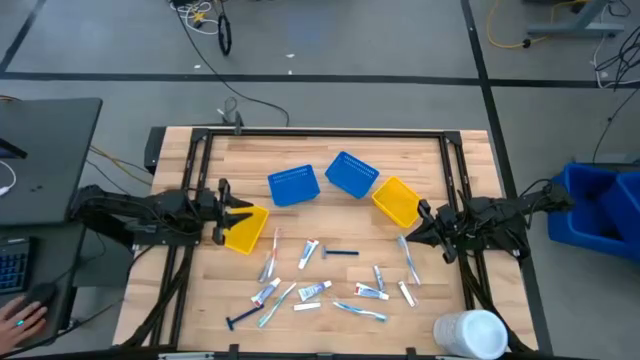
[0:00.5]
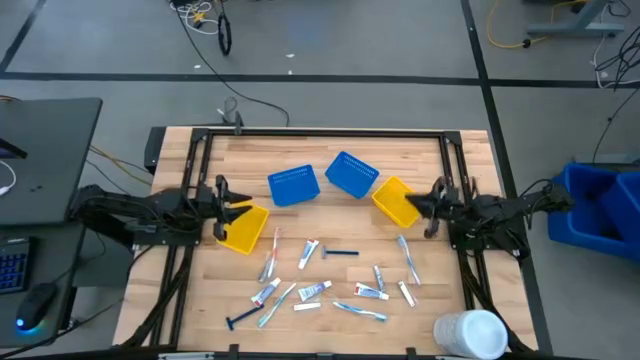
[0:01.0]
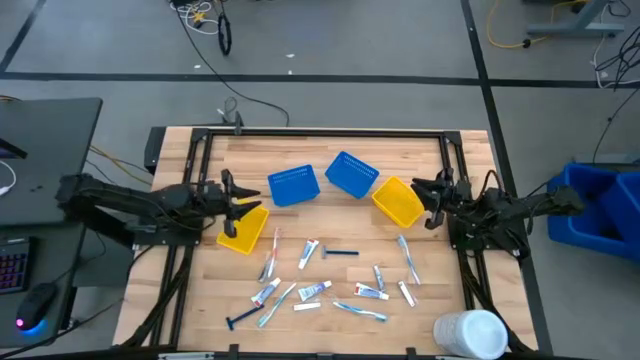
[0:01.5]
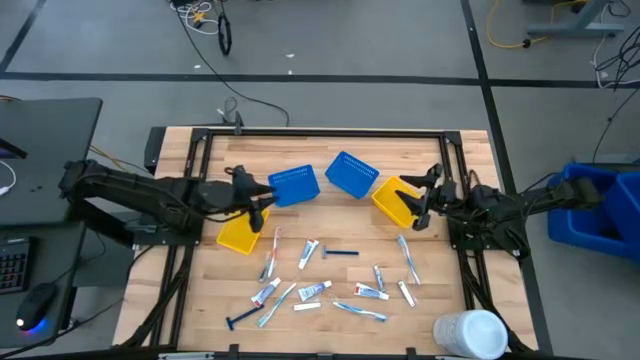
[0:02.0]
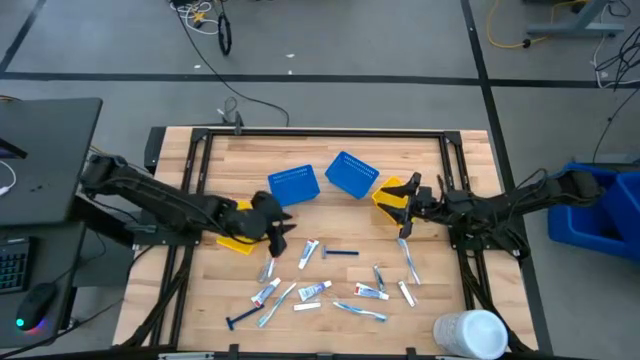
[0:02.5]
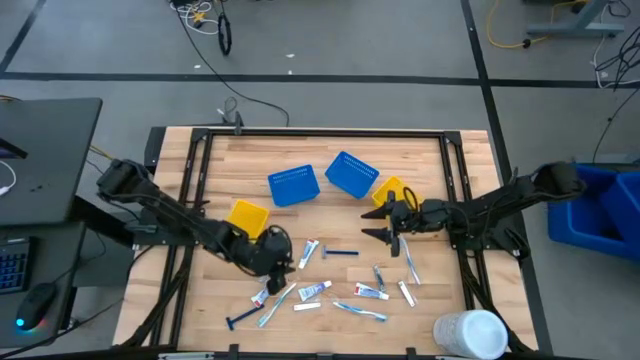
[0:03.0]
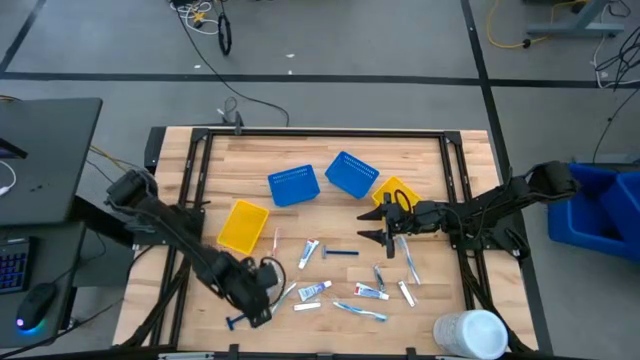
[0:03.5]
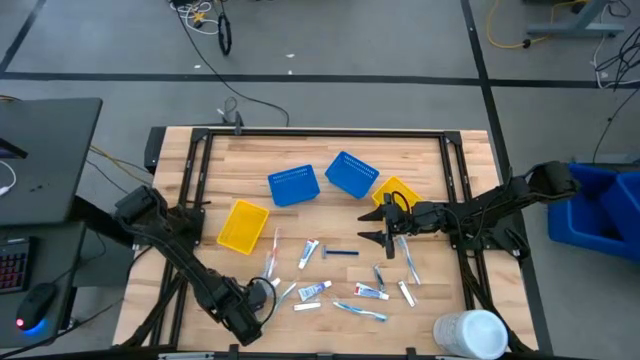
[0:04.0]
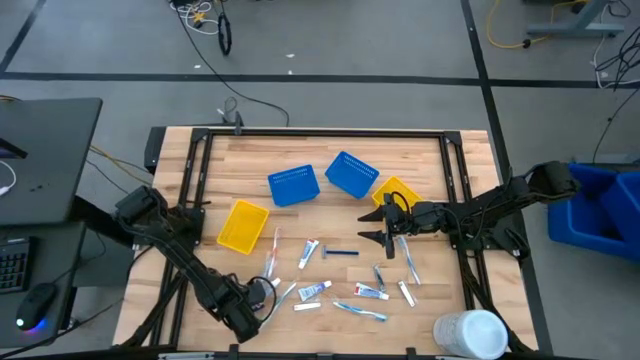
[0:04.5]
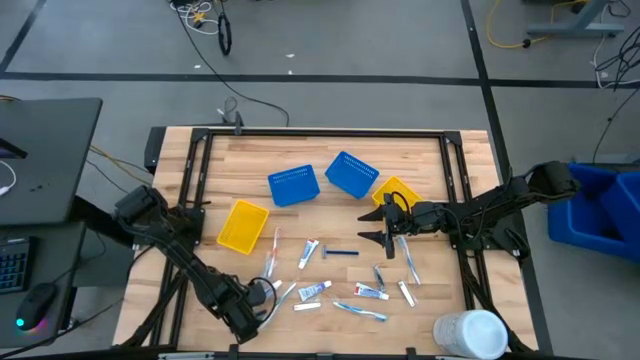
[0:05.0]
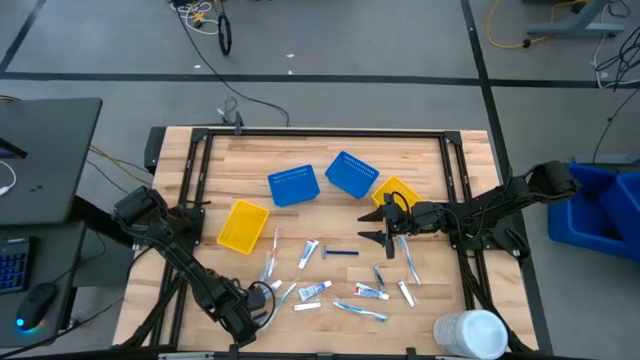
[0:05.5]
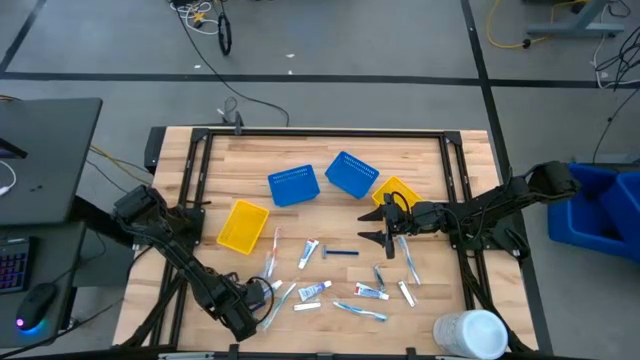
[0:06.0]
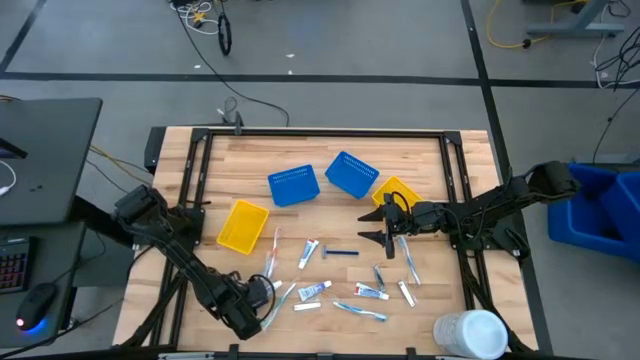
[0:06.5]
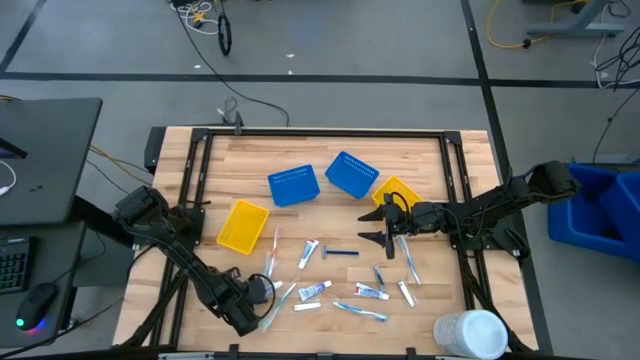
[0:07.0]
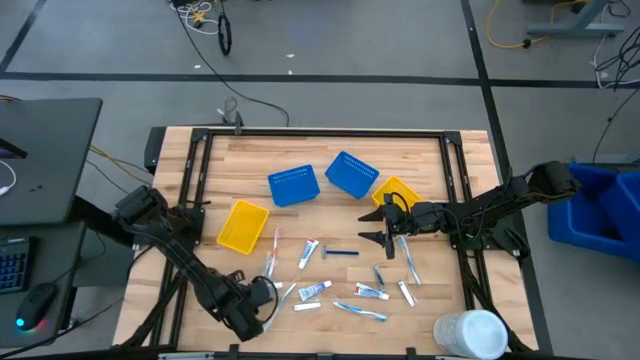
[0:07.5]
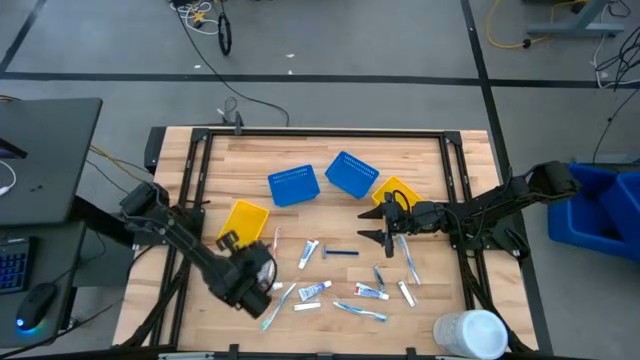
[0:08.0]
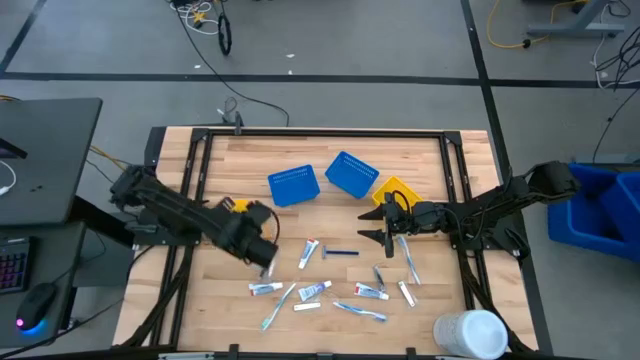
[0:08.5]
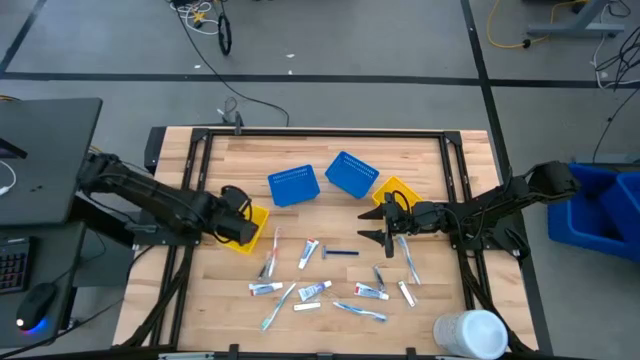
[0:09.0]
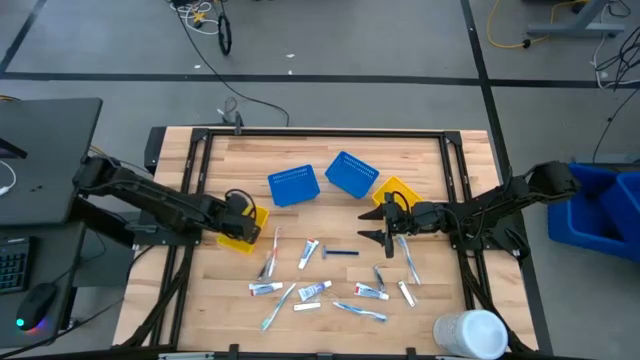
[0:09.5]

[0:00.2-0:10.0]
Task: Pick & Place Travel size toiletries
Put the blue razor into the left yellow bin

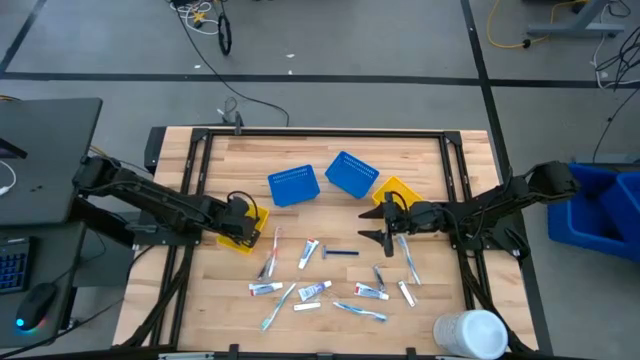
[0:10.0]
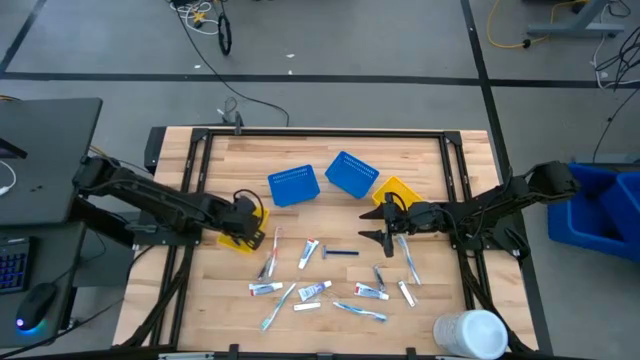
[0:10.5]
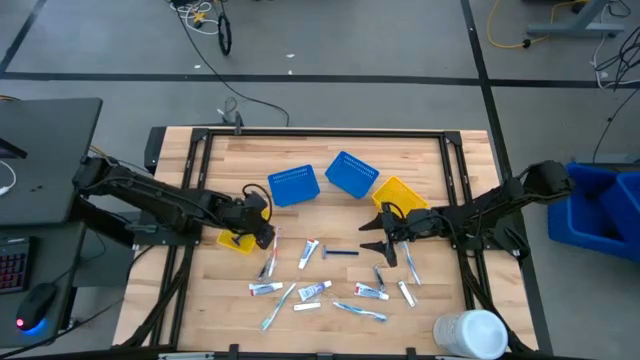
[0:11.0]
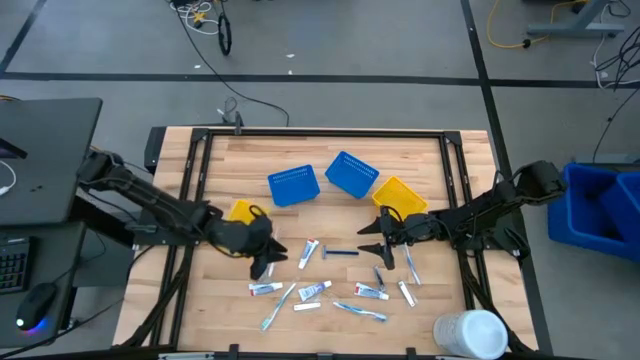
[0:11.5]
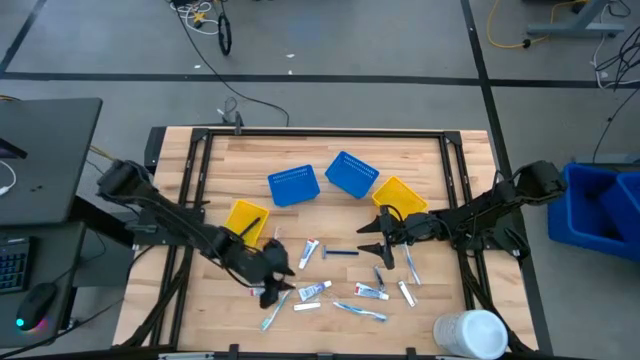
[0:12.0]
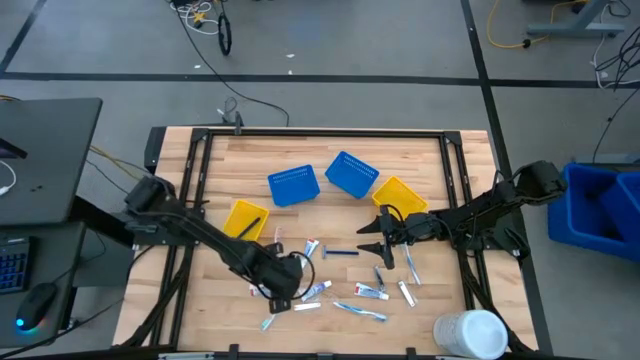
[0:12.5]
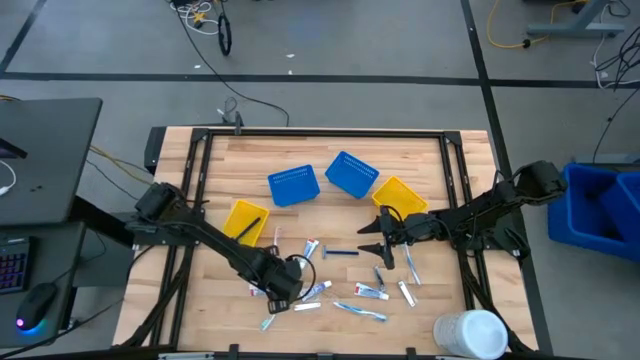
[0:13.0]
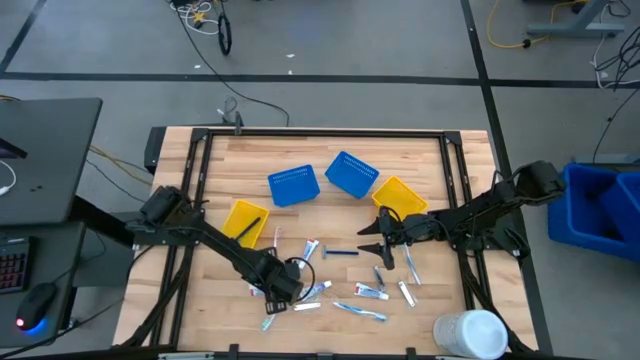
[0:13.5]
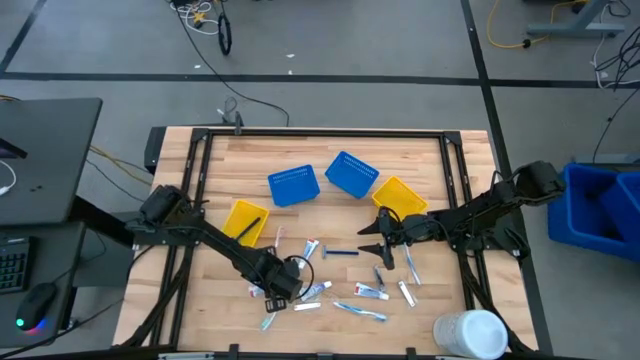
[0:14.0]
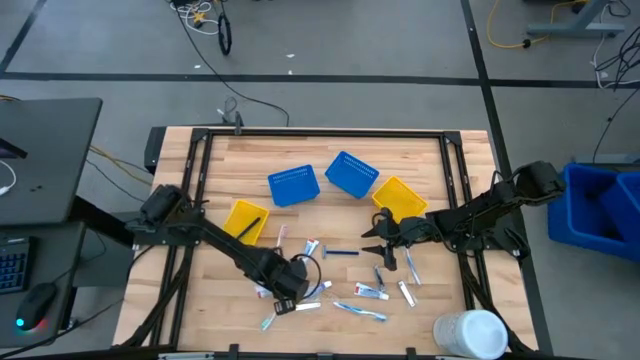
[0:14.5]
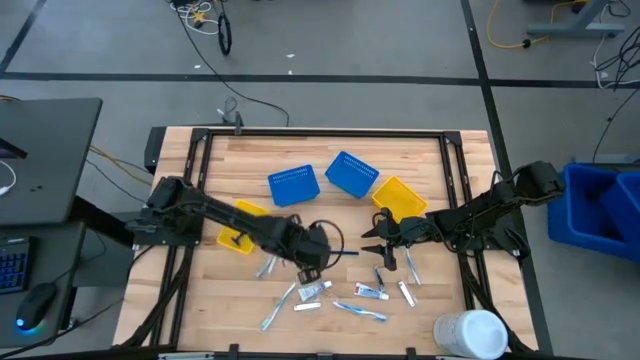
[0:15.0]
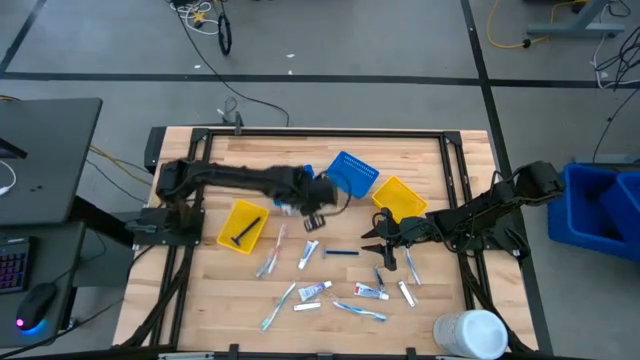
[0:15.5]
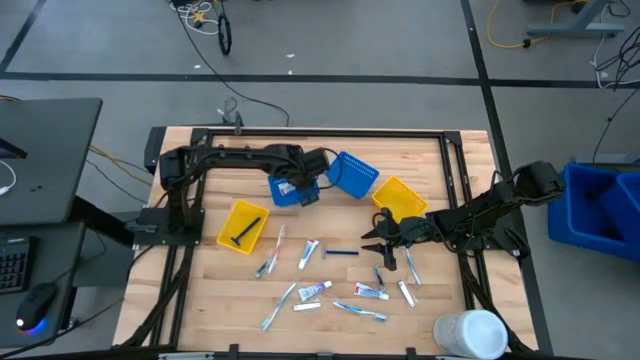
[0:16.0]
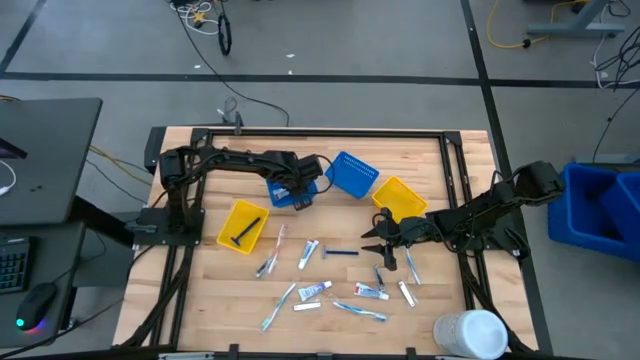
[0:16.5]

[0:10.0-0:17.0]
Put the white toothpaste into the left blue bin

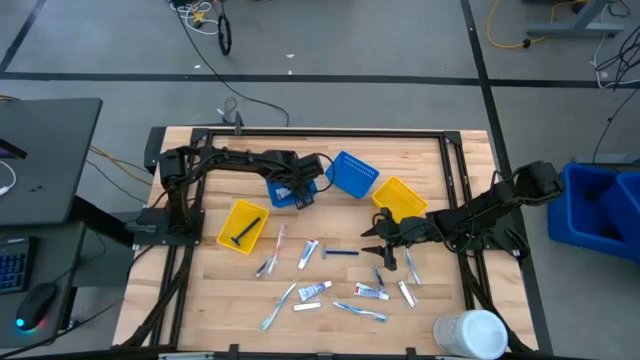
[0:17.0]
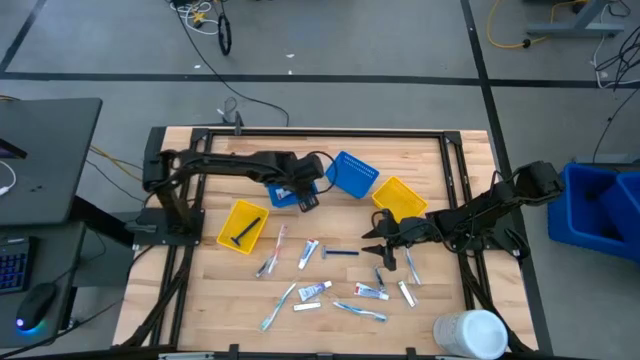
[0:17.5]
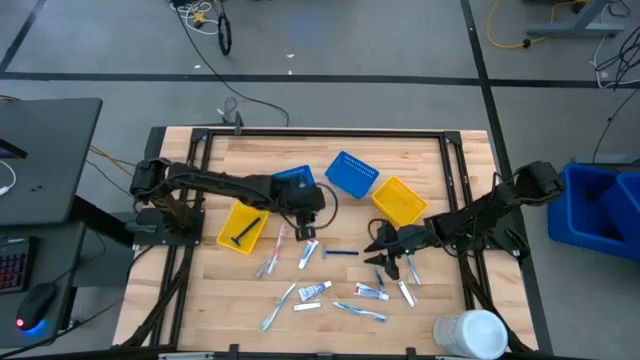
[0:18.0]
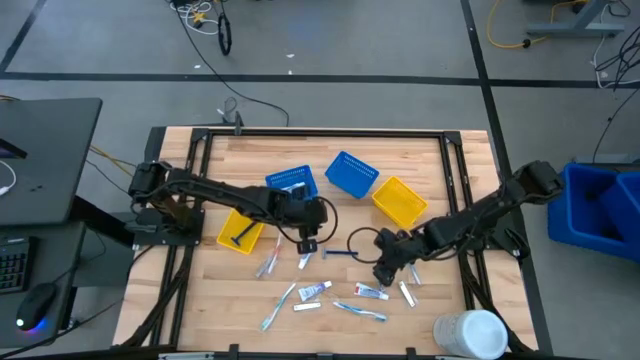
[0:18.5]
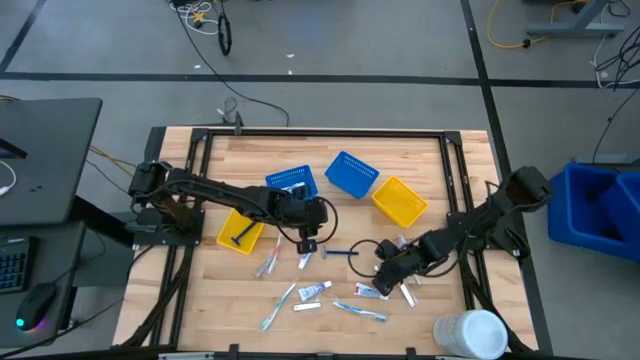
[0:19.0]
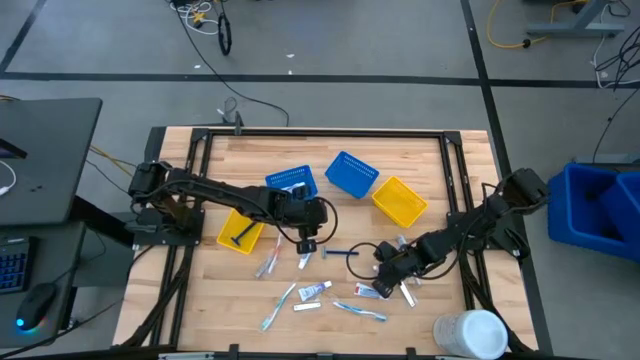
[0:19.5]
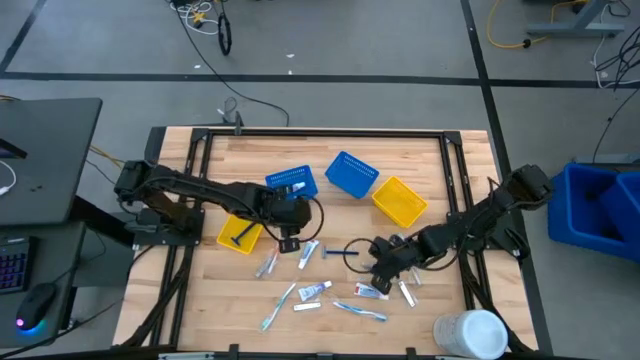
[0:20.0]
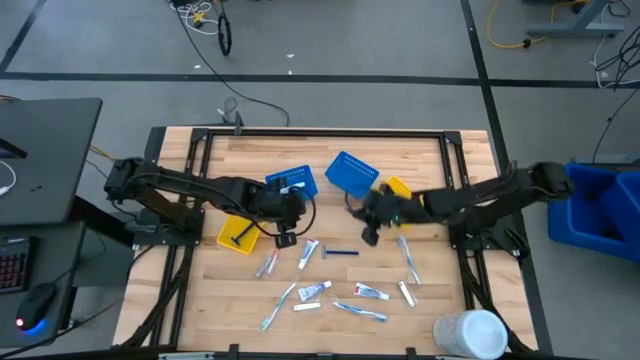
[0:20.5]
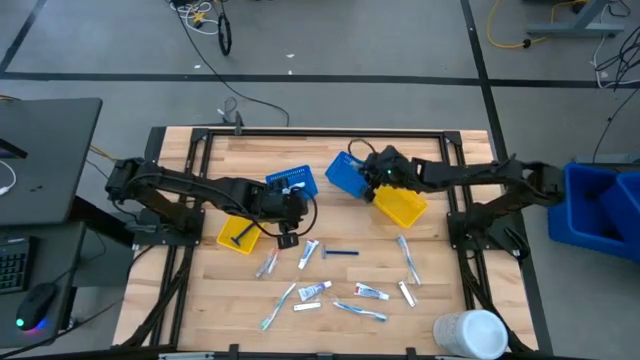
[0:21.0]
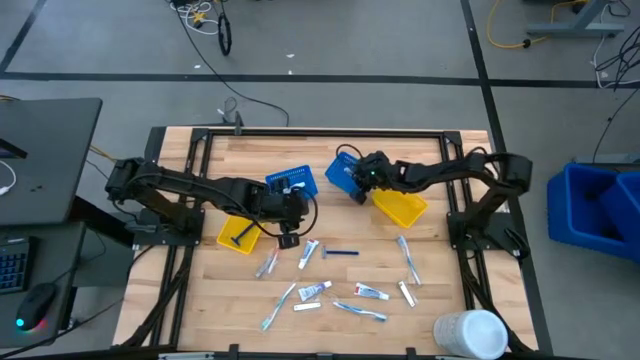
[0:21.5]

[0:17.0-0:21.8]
Put the silver nail cutter into the right blue bin
